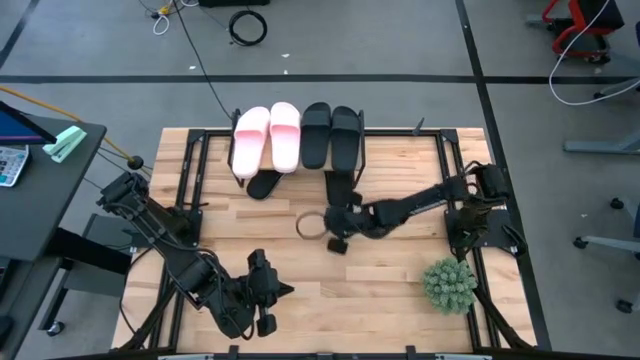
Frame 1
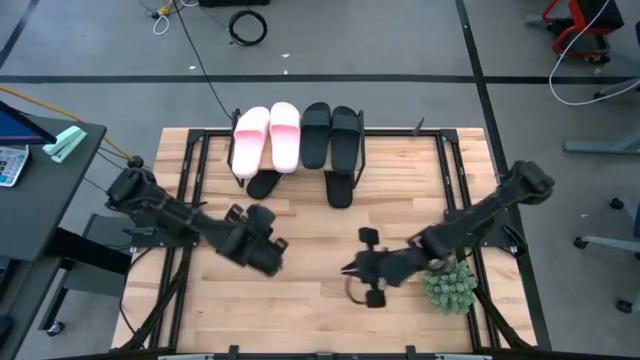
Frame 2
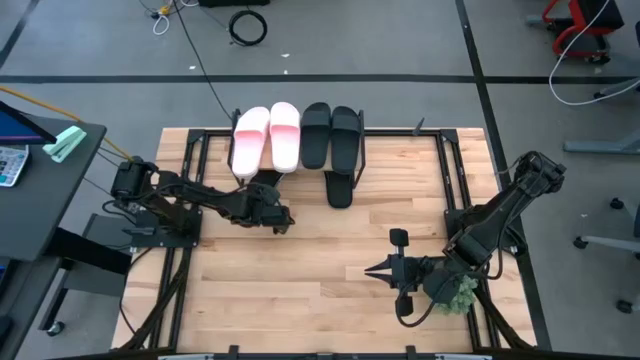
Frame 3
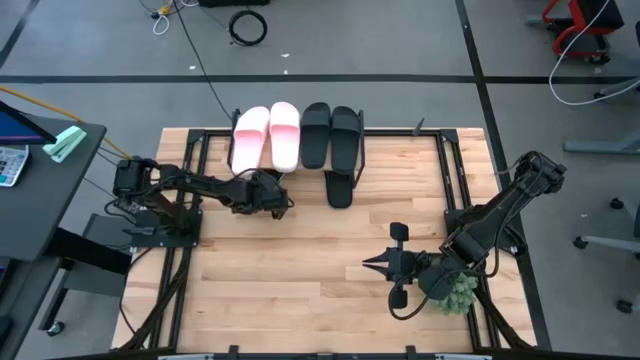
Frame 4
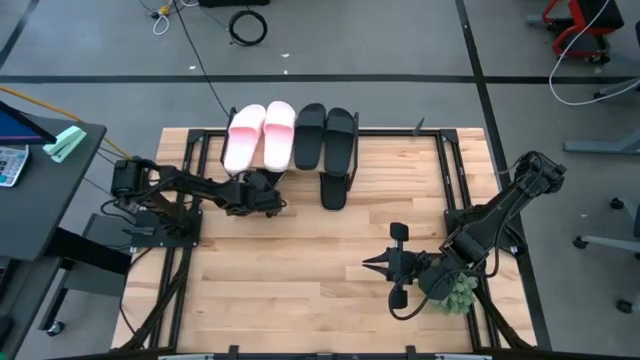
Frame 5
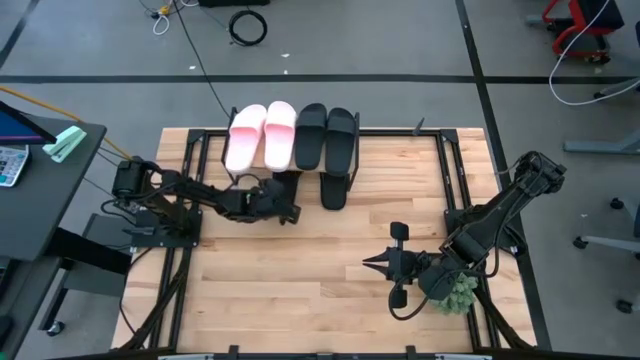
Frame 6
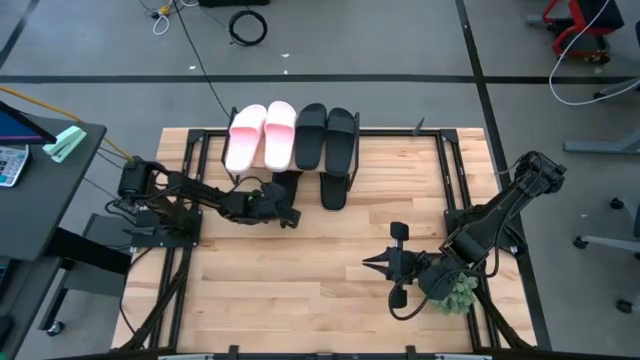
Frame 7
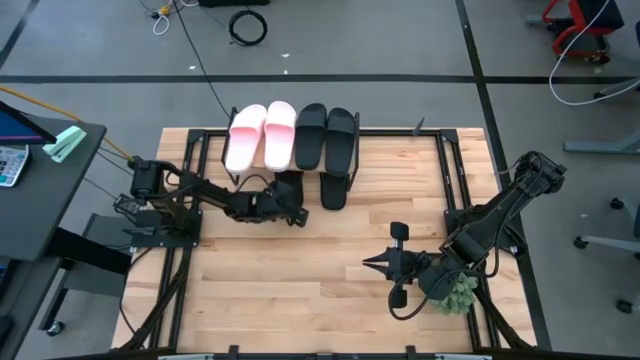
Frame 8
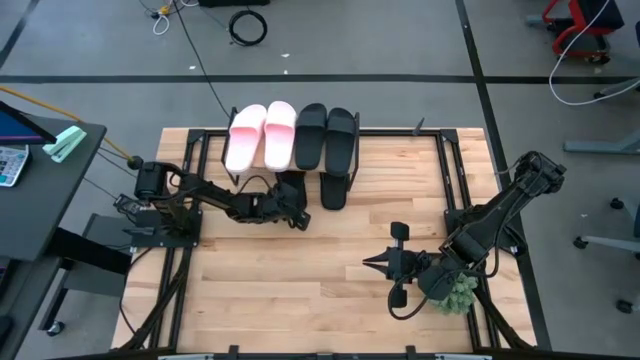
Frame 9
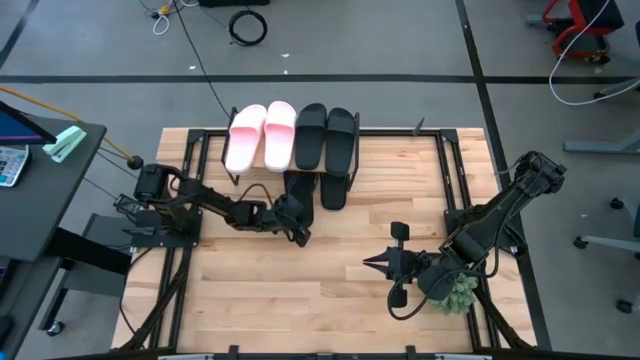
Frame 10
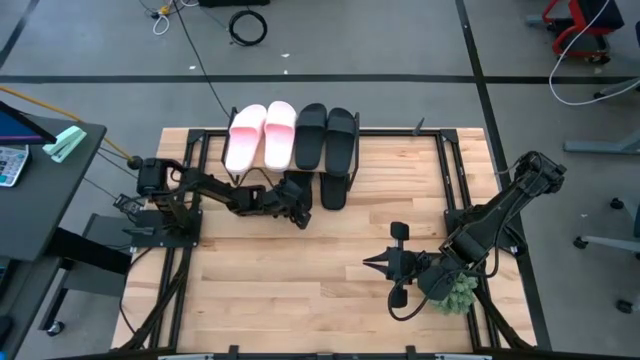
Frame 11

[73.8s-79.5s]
Task: Pick and place slides into the shelf
Adjust the black slipper

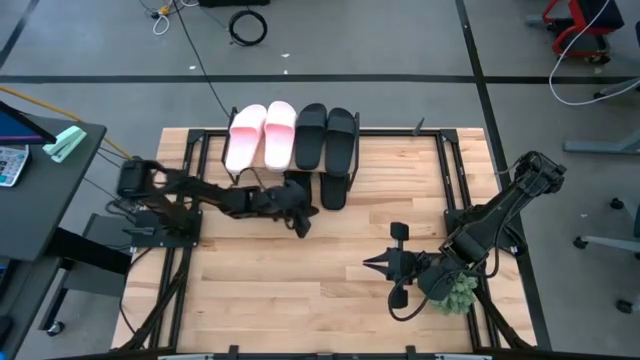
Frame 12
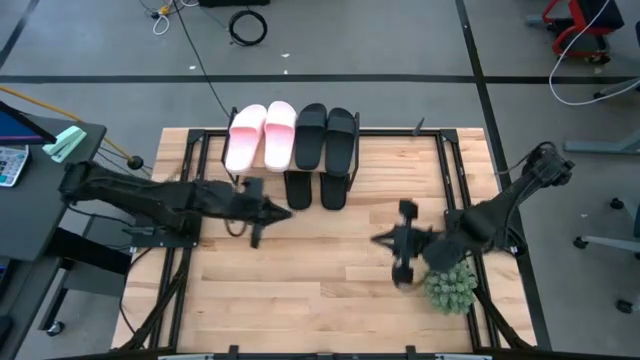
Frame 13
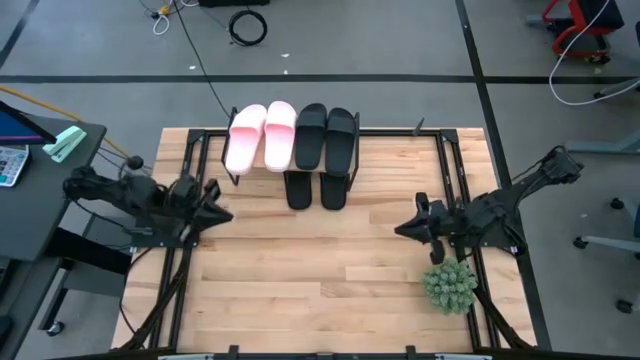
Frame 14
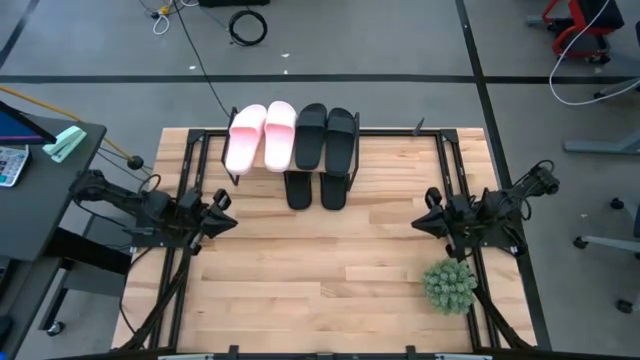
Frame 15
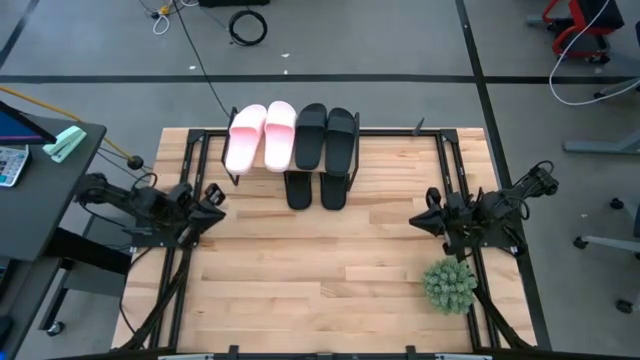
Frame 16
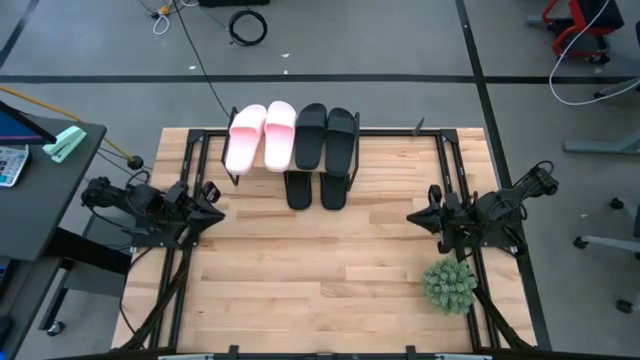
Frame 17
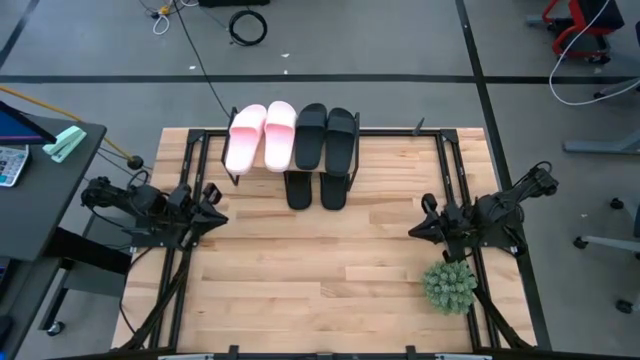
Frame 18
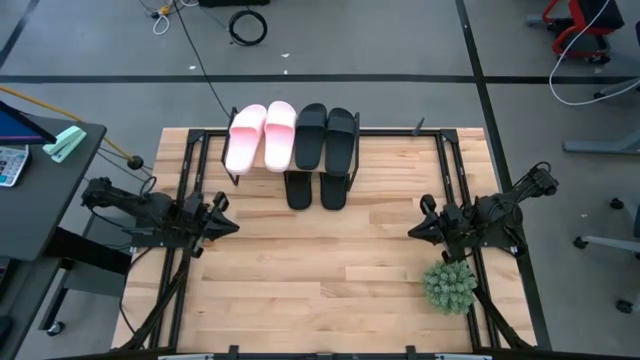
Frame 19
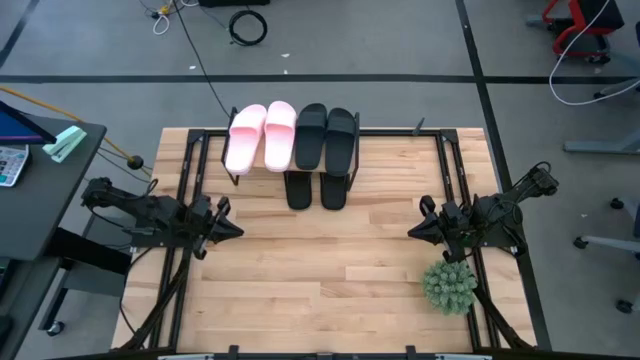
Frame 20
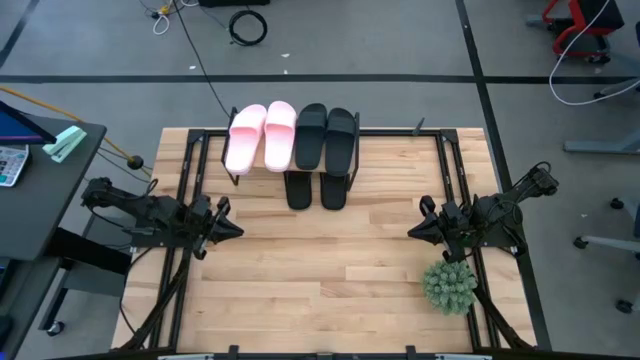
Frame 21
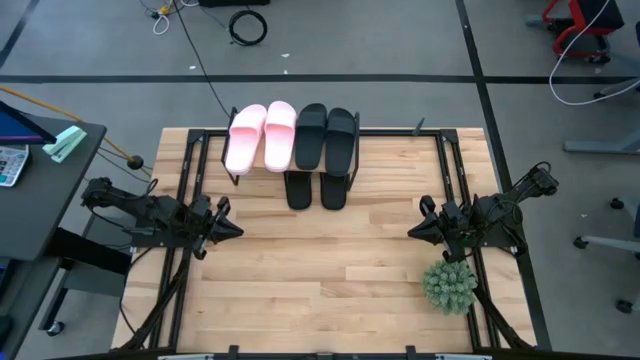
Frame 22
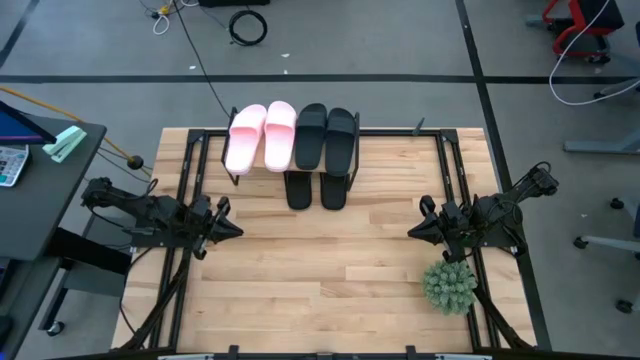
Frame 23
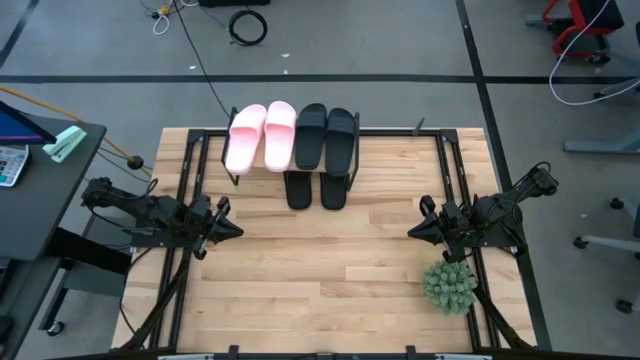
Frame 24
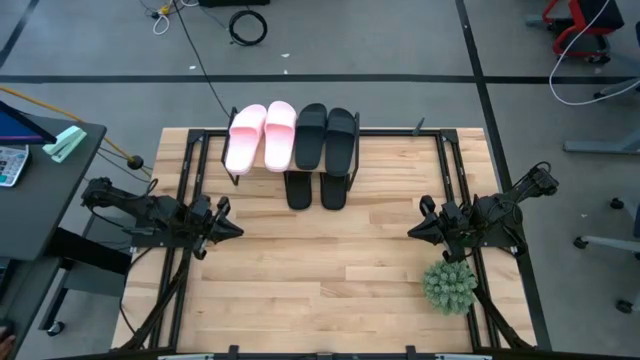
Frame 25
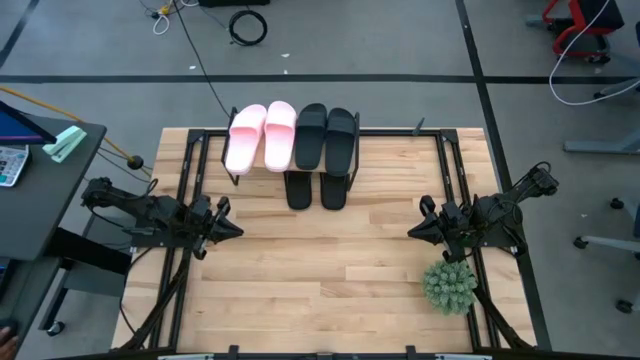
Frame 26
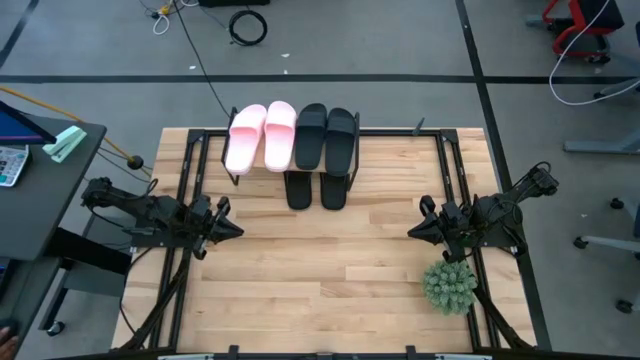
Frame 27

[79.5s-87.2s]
Return to Home Position

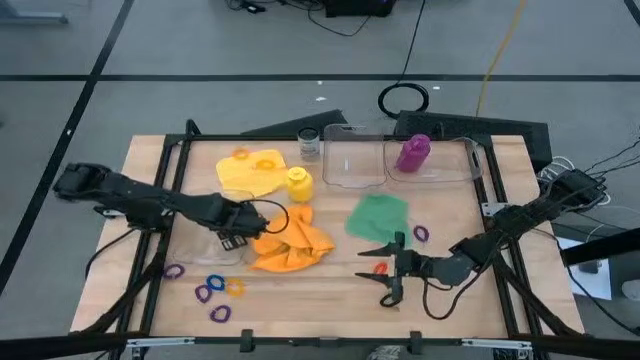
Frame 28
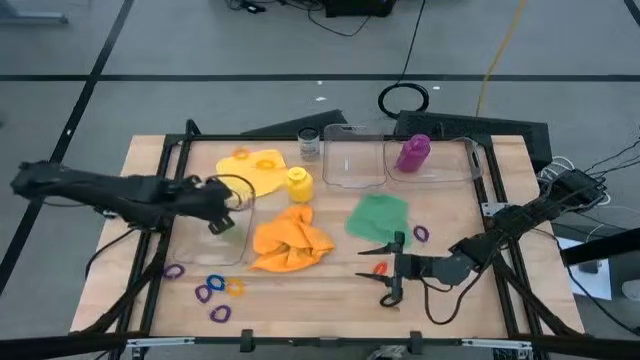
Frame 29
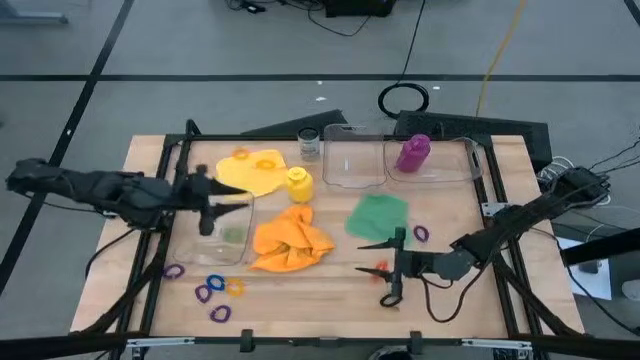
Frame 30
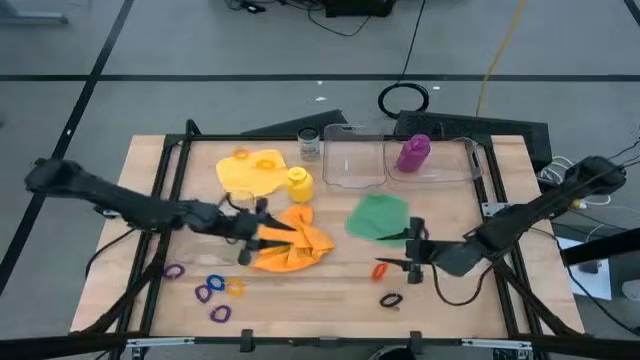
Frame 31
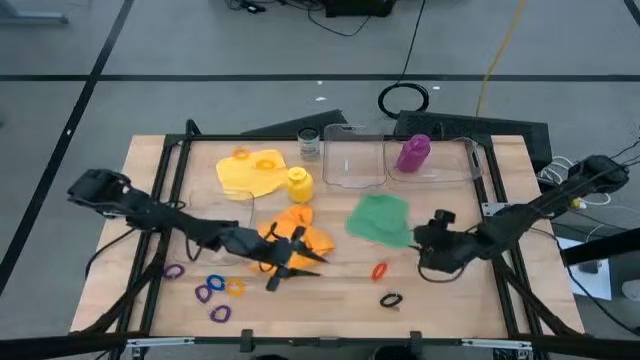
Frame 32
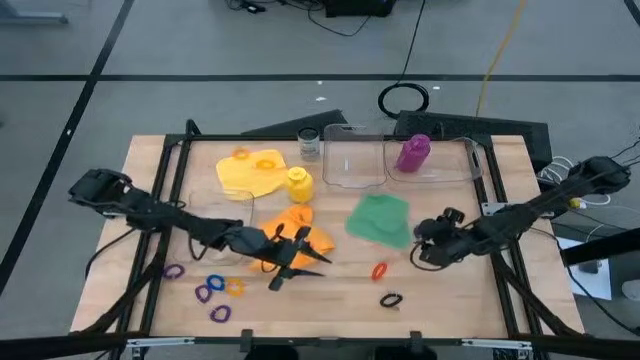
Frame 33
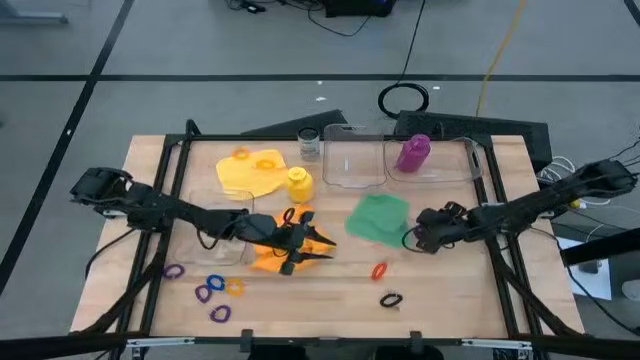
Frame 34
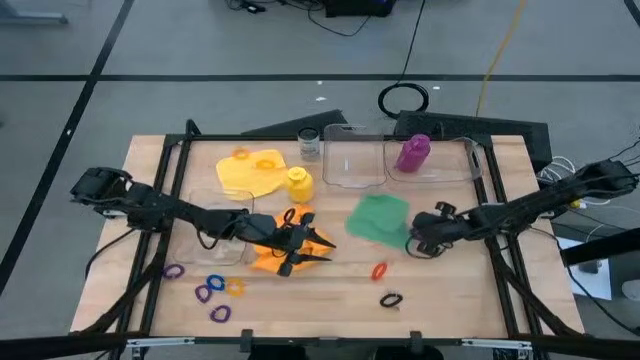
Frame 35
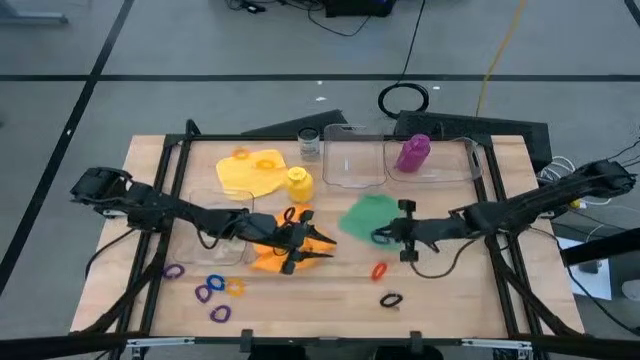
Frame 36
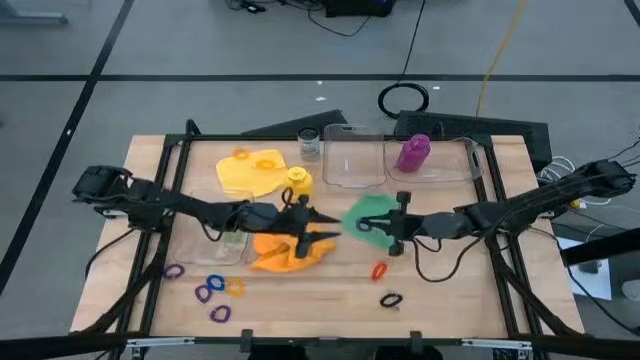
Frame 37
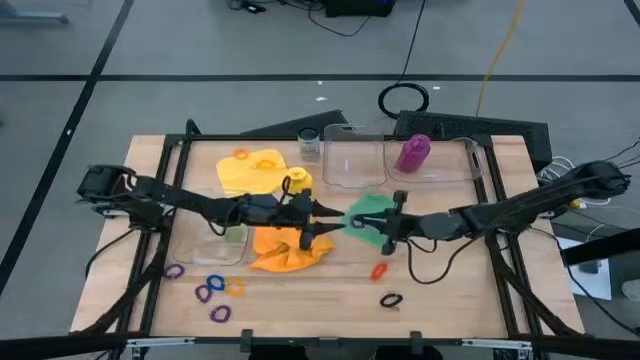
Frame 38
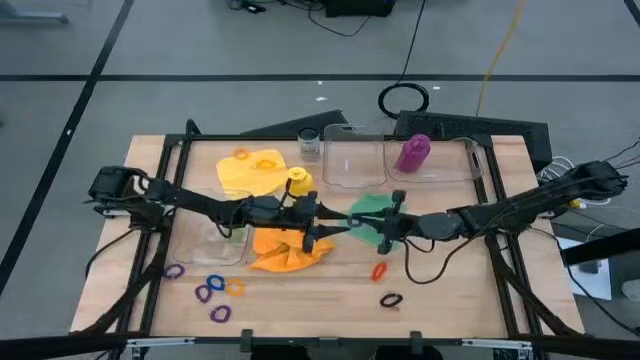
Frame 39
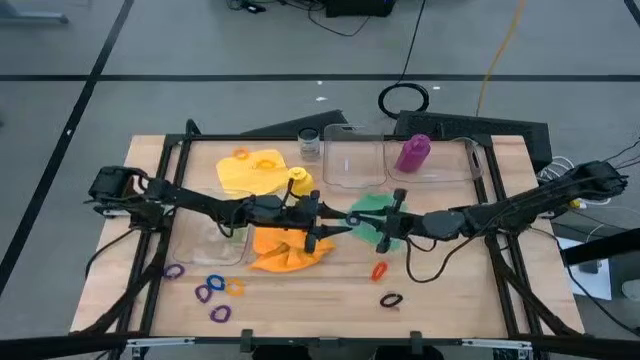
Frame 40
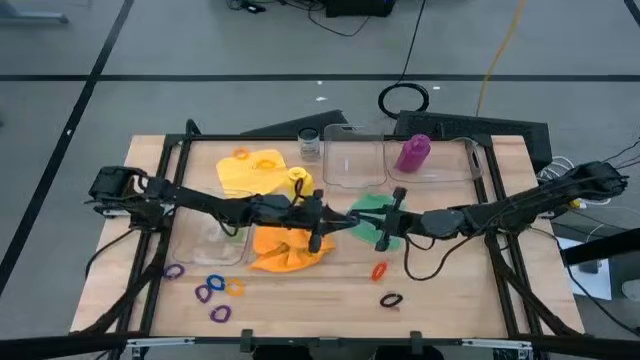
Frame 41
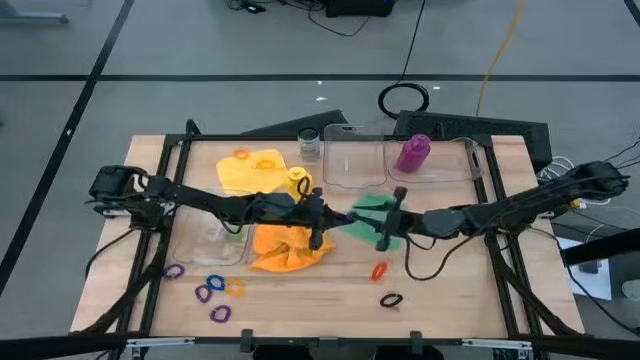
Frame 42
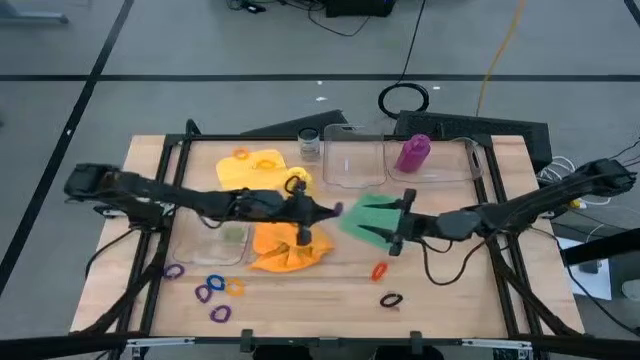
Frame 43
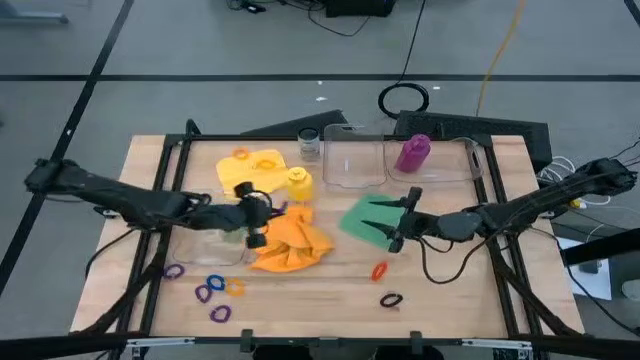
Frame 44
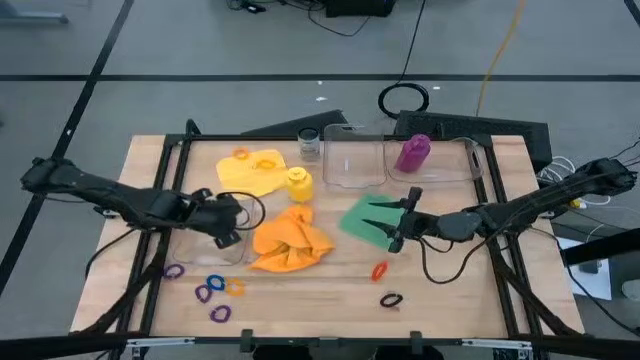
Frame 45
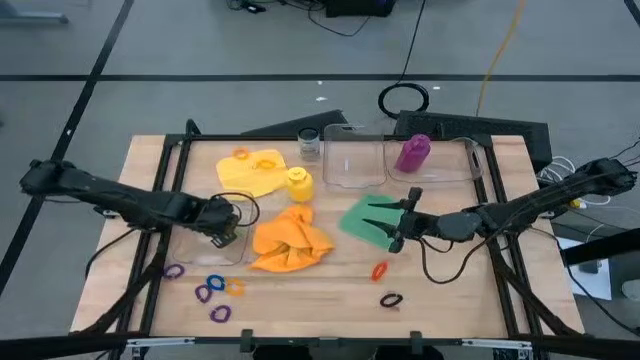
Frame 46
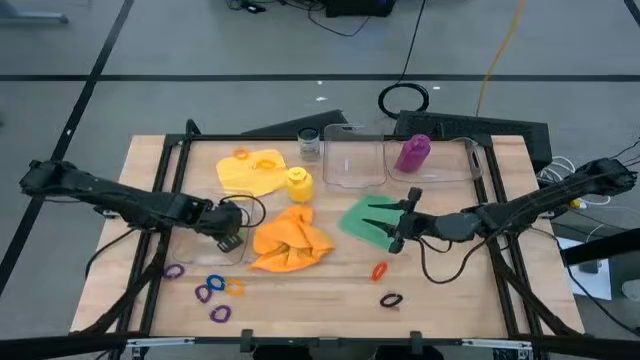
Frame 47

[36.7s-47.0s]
Task: Pick & Place Sports Items
Put the purple spring keychain into the bottom transparent bin
